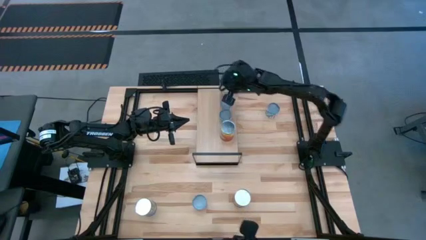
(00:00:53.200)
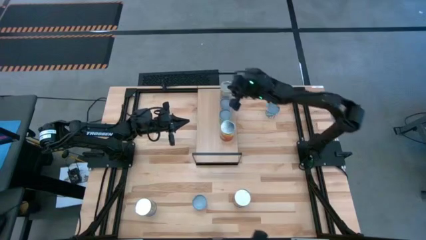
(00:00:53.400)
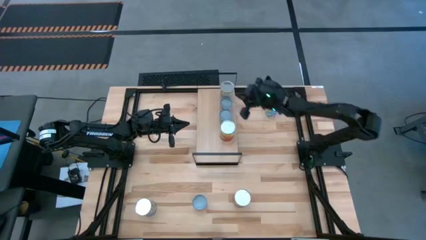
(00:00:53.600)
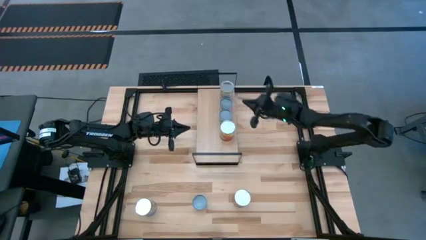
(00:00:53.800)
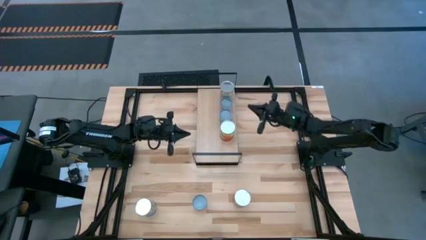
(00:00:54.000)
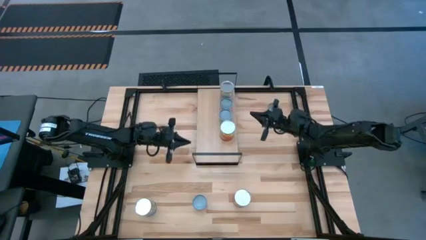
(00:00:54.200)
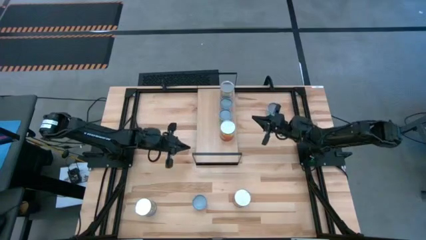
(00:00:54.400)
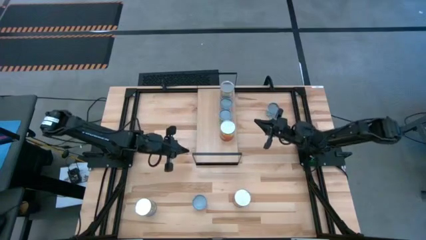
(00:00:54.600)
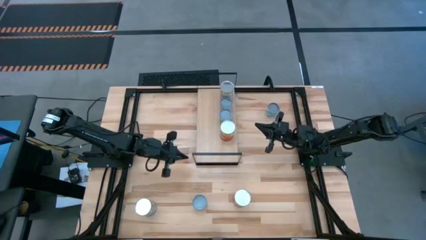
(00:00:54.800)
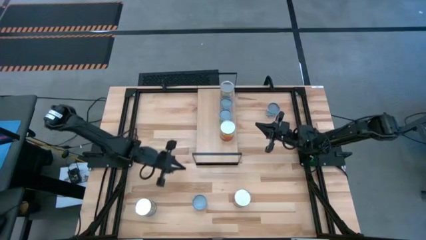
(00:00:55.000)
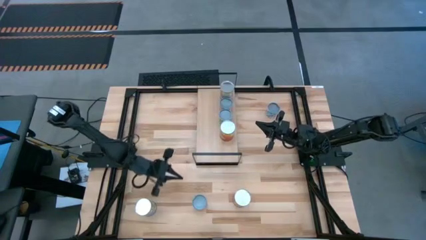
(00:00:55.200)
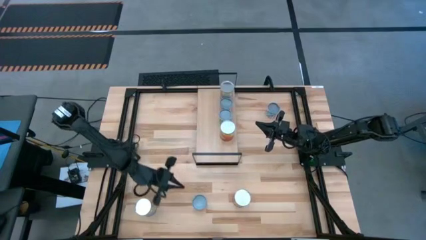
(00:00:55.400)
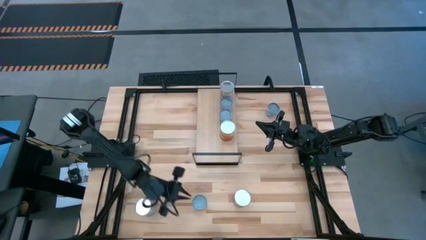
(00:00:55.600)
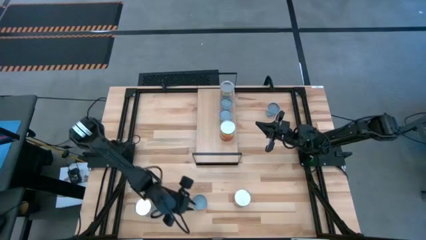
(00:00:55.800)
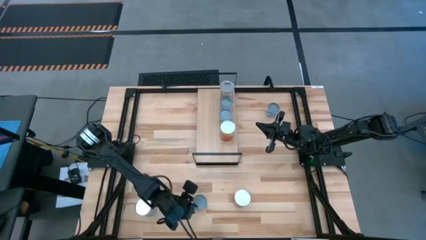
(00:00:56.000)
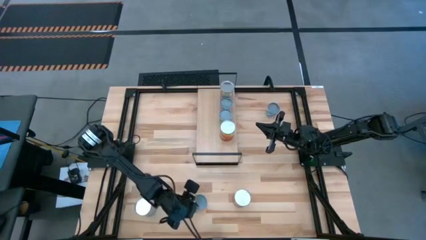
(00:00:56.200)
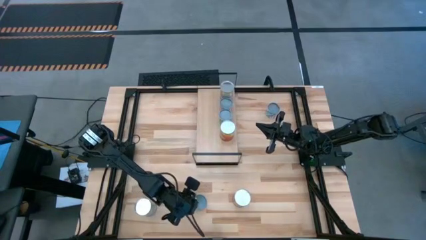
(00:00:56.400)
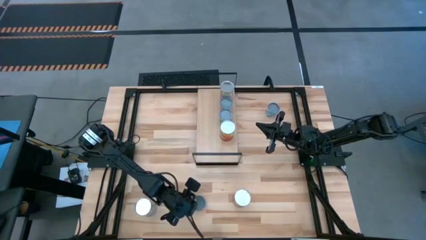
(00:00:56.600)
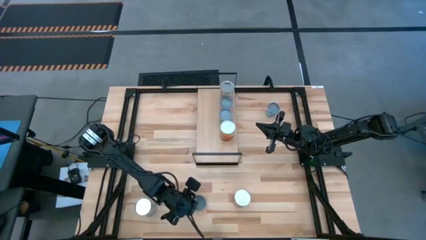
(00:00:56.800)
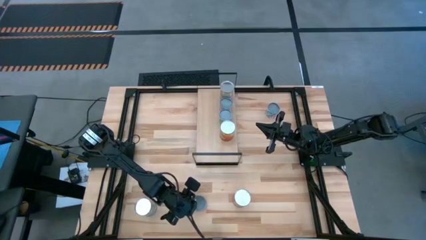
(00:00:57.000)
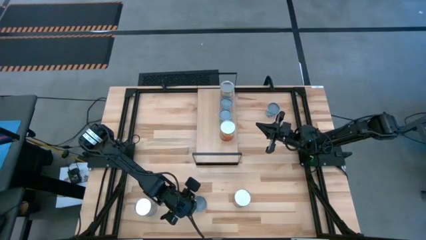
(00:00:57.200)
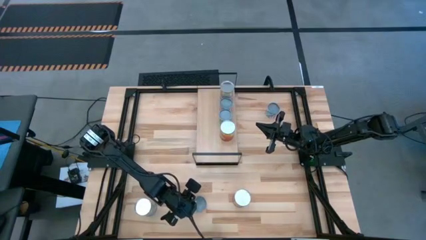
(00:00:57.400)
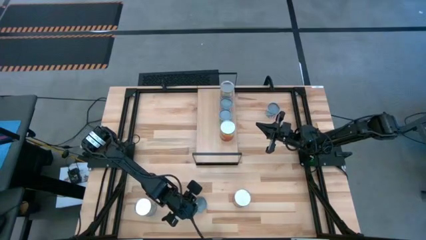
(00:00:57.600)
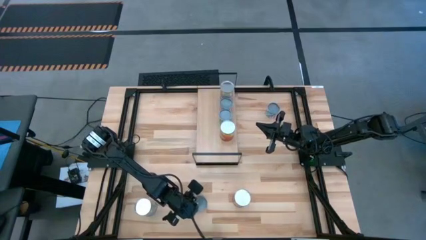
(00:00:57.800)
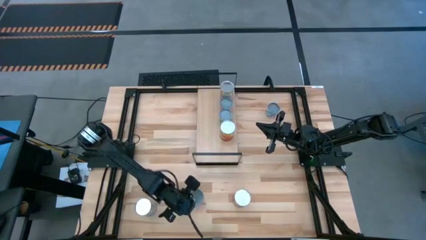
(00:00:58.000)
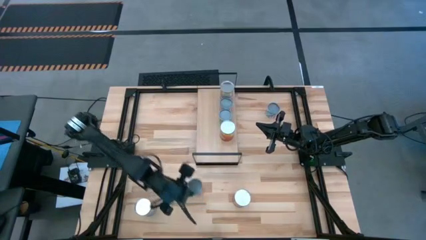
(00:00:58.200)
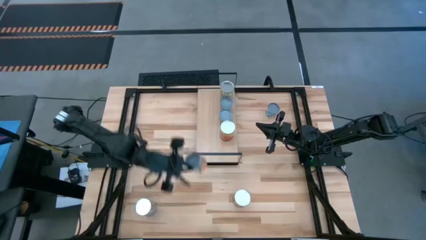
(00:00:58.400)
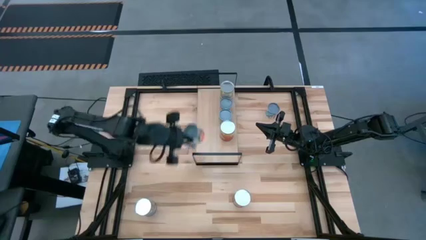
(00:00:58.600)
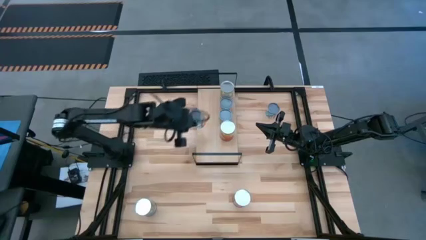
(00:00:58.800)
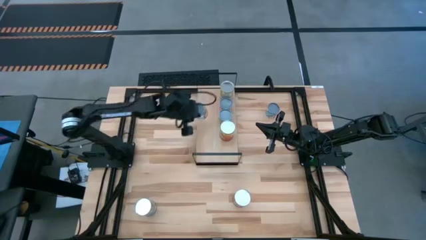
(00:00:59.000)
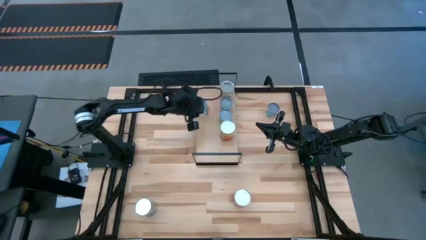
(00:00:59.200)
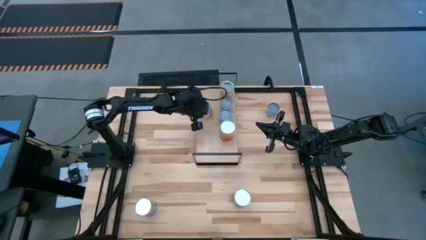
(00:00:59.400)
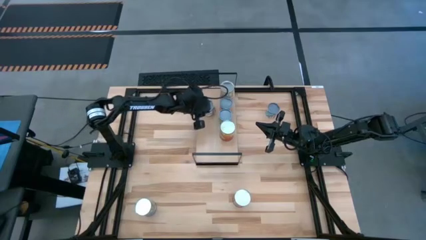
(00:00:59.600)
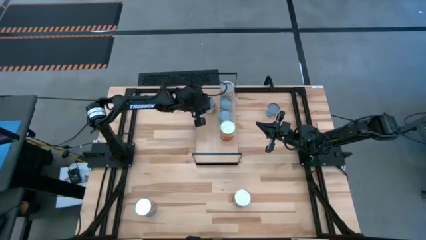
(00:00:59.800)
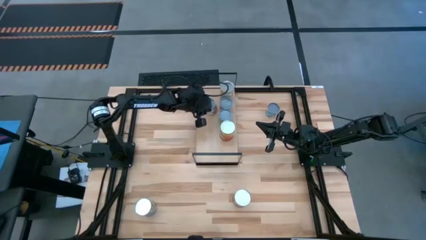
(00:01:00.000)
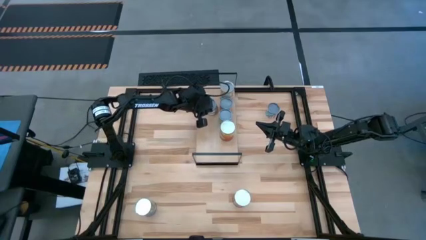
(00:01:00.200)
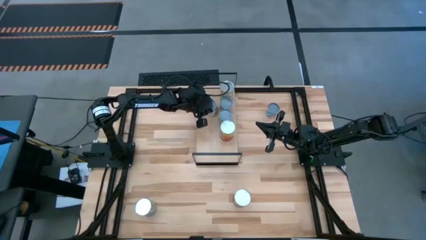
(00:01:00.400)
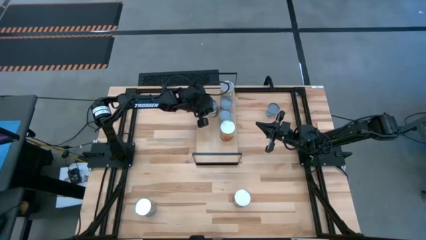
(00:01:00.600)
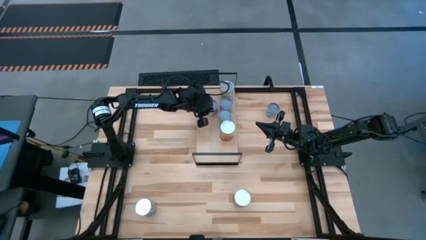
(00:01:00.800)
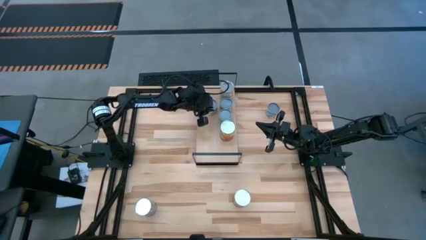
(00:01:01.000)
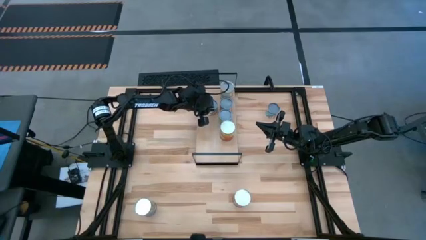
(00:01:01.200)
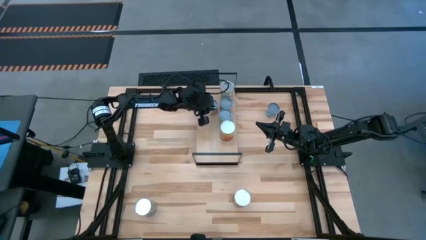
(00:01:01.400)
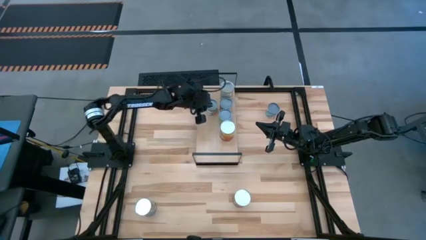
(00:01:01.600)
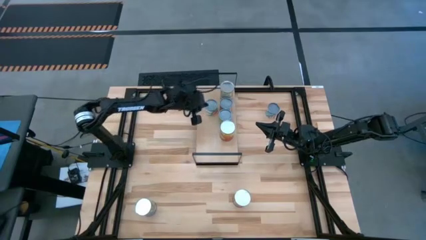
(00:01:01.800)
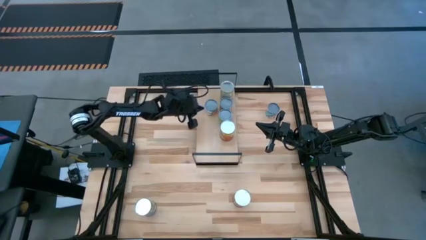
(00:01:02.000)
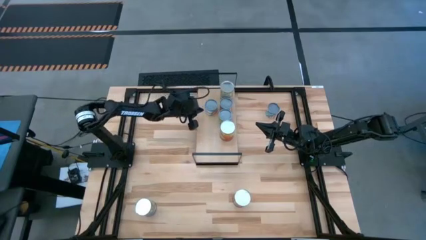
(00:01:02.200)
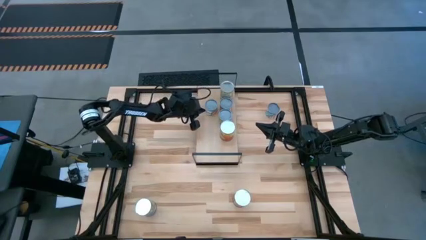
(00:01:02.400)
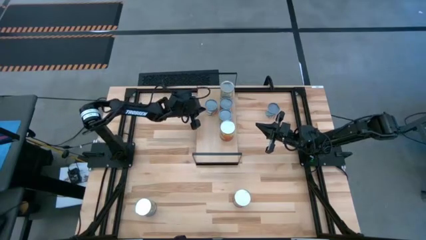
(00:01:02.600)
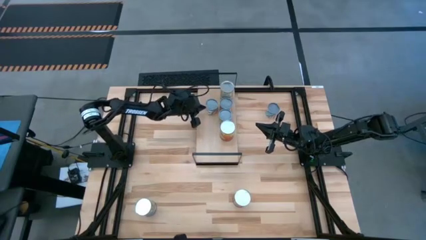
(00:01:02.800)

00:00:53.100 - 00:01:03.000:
Task: Pick and place cans onto a shelf
Put the small canned oranges on the shelf

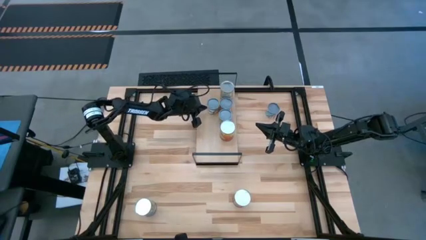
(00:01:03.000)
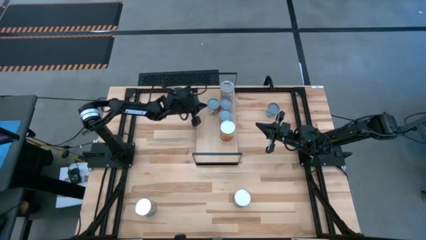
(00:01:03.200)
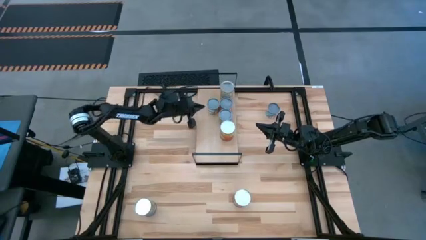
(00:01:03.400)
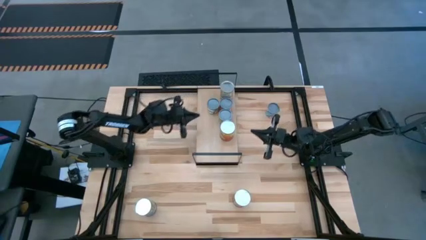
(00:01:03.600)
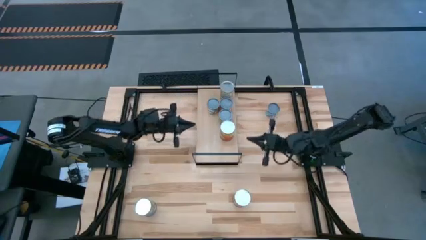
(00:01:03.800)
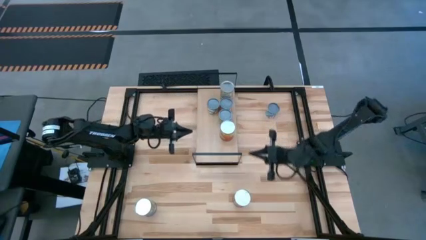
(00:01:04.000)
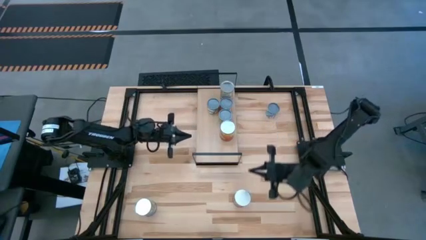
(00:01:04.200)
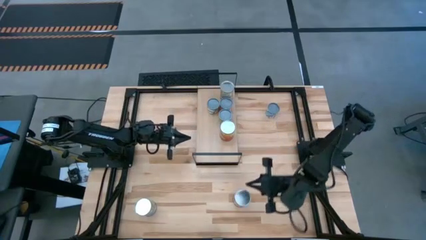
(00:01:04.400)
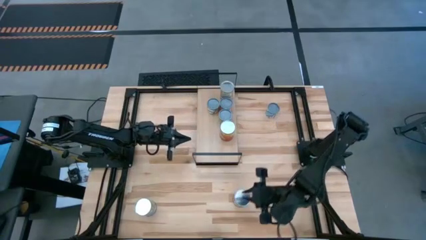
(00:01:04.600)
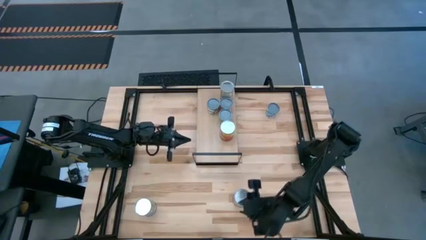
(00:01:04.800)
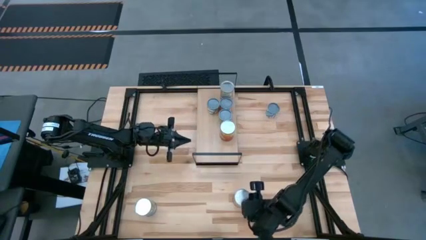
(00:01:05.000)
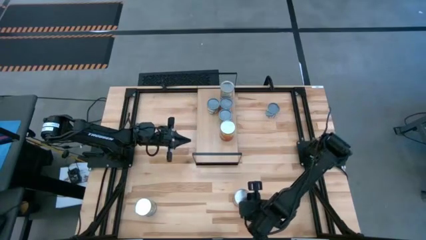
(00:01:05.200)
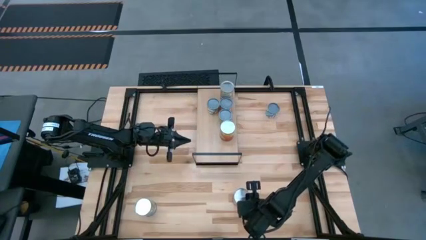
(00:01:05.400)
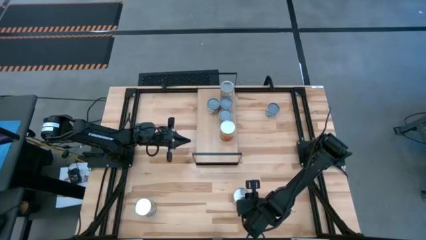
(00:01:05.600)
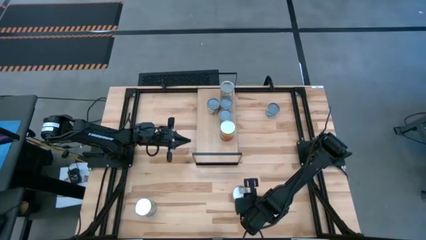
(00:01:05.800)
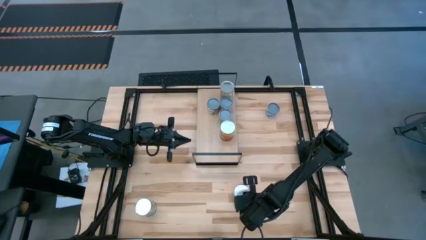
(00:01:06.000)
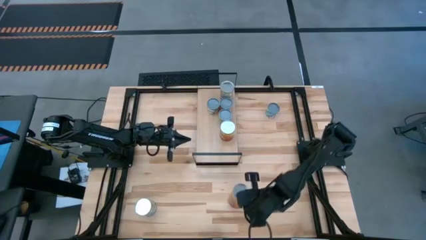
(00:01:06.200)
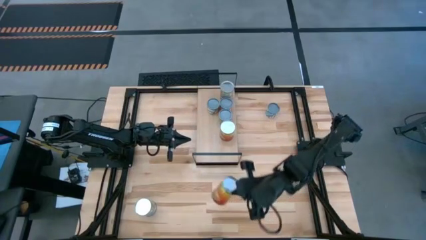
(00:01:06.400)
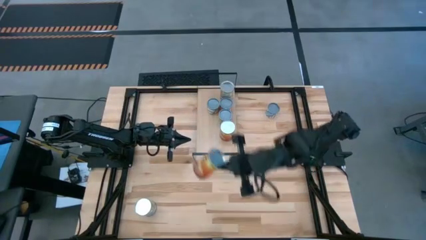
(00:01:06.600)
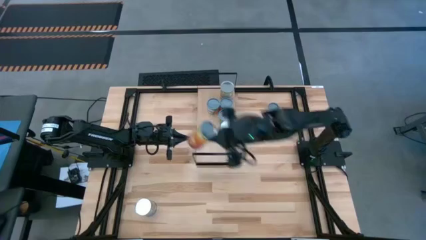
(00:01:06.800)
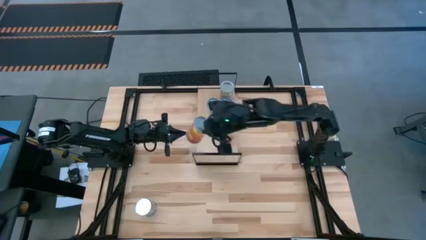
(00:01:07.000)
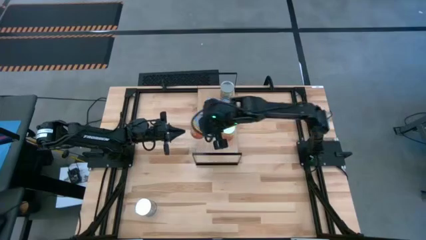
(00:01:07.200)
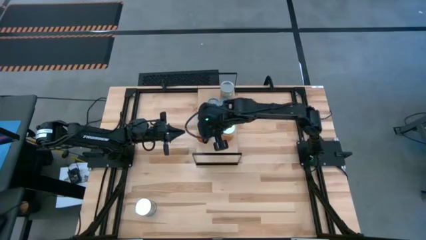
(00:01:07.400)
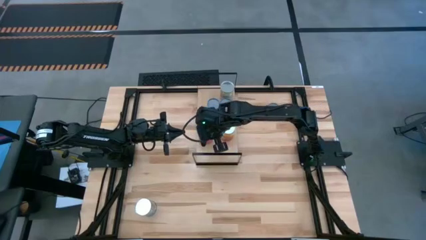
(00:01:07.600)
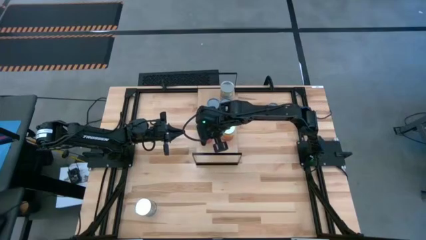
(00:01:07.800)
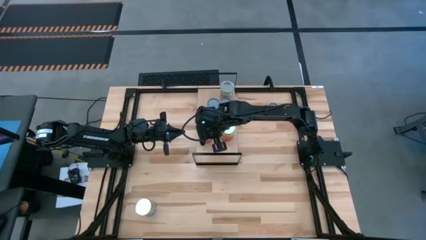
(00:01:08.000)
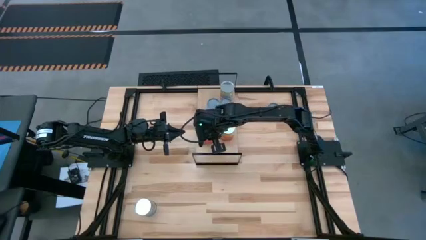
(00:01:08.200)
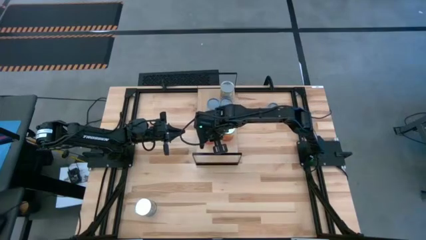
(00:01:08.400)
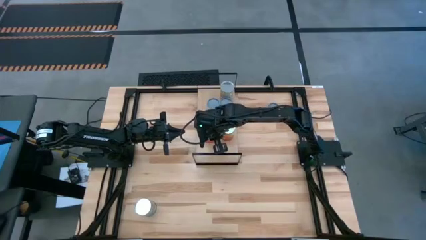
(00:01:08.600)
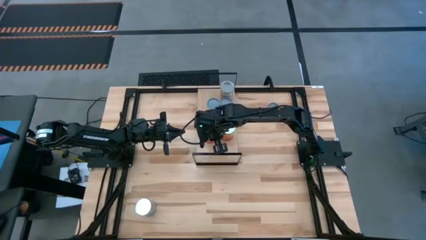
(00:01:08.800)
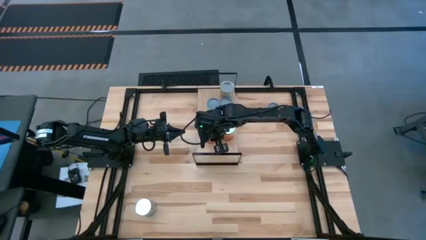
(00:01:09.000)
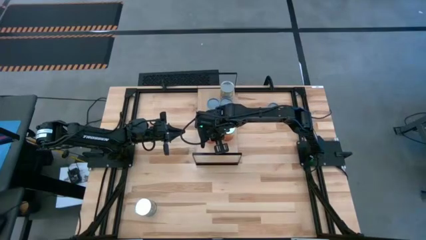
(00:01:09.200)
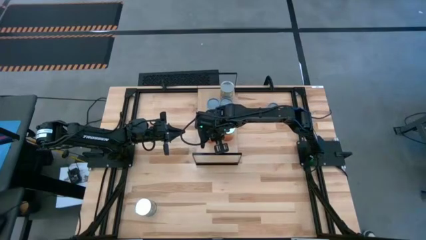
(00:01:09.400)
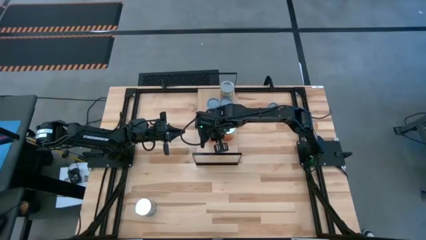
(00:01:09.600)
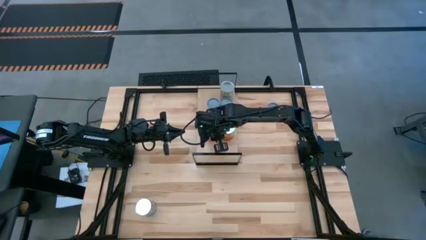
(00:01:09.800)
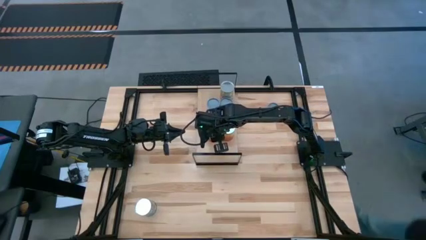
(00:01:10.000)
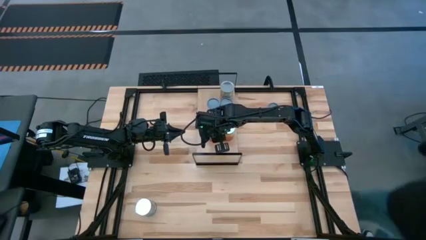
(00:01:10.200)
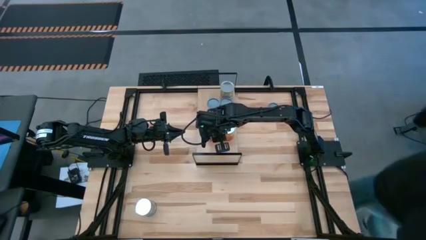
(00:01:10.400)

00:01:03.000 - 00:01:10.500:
Put the large canned corn on the shelf
